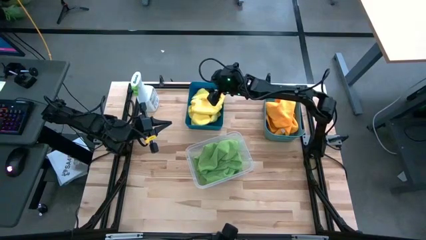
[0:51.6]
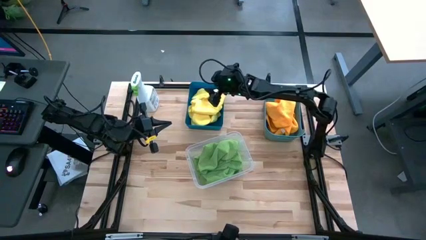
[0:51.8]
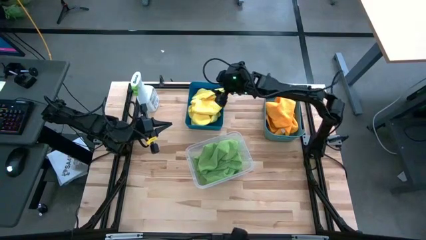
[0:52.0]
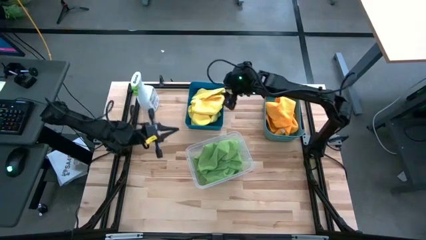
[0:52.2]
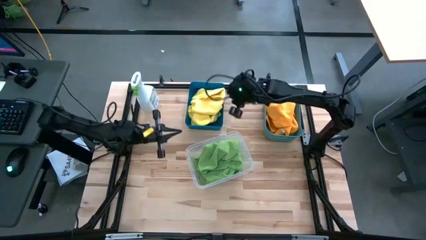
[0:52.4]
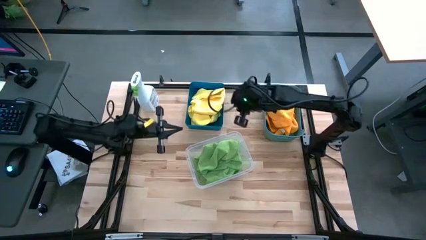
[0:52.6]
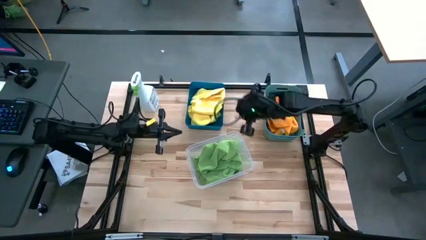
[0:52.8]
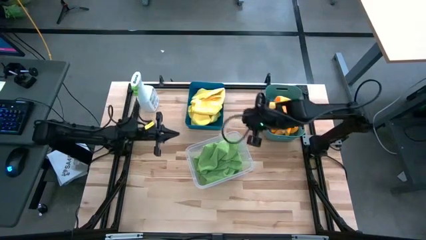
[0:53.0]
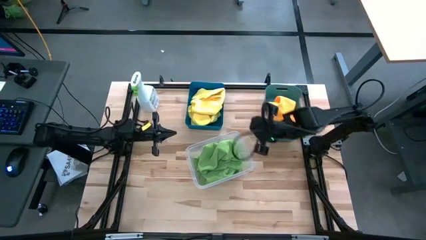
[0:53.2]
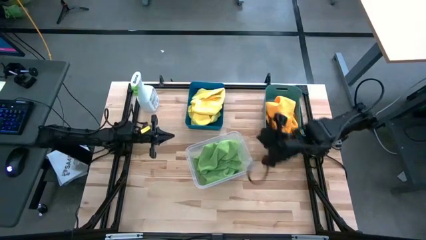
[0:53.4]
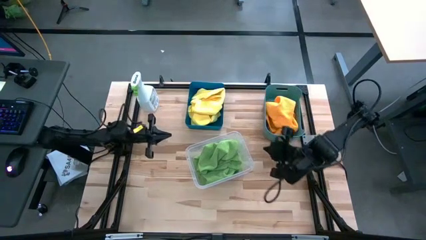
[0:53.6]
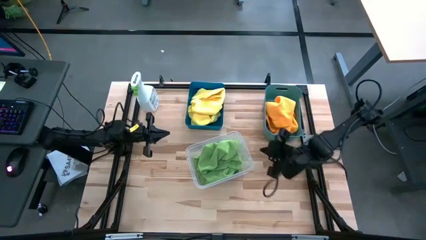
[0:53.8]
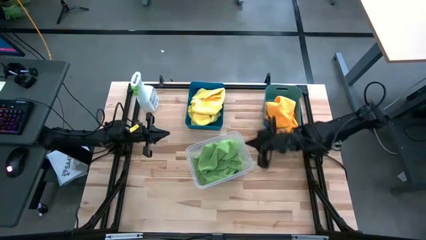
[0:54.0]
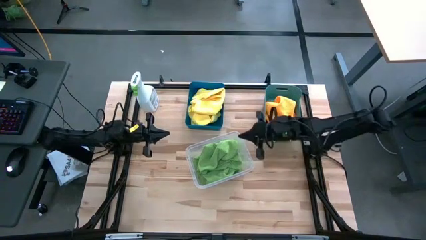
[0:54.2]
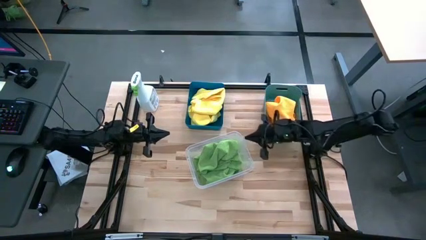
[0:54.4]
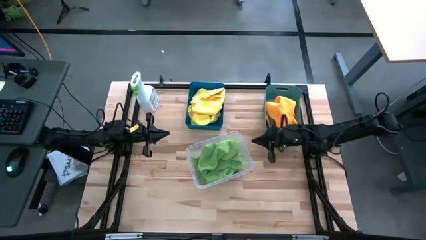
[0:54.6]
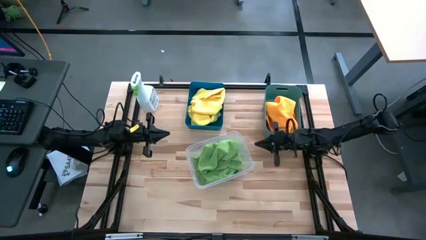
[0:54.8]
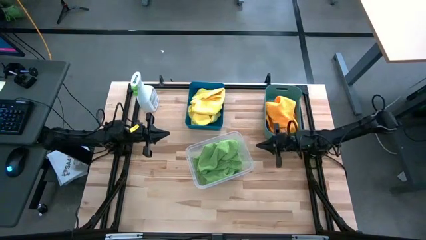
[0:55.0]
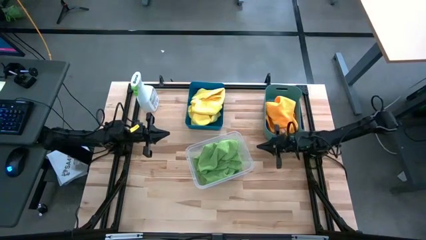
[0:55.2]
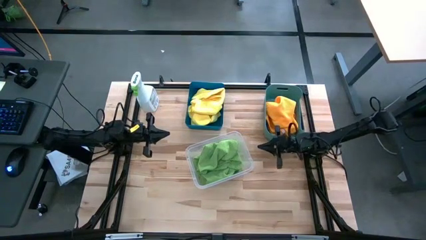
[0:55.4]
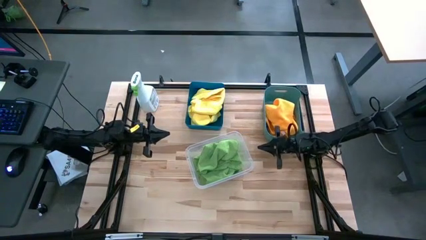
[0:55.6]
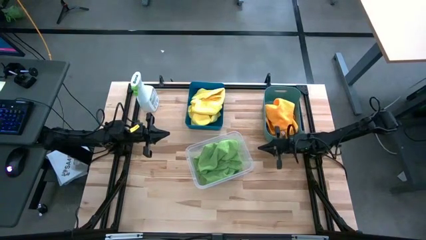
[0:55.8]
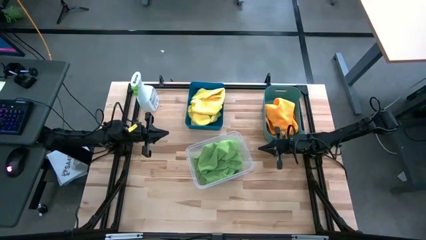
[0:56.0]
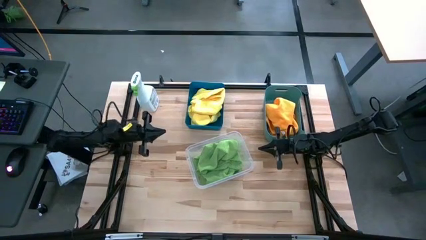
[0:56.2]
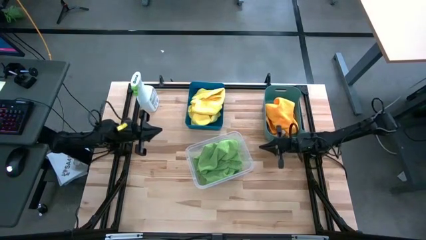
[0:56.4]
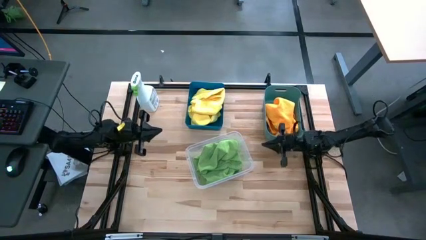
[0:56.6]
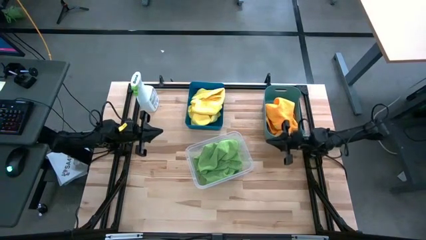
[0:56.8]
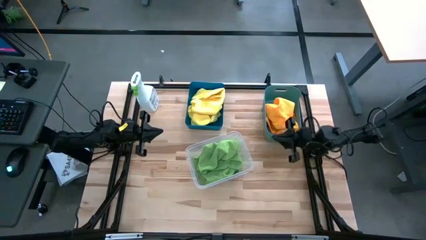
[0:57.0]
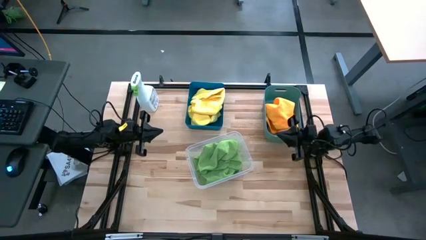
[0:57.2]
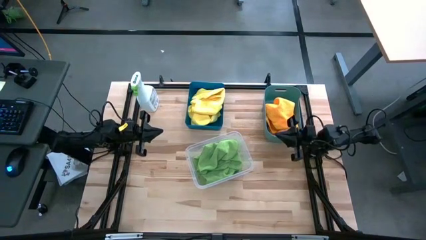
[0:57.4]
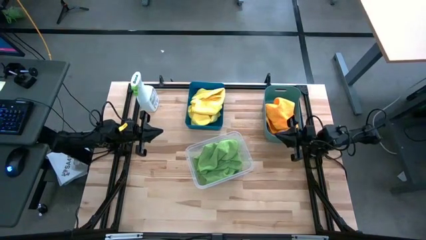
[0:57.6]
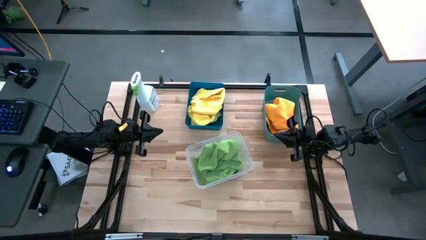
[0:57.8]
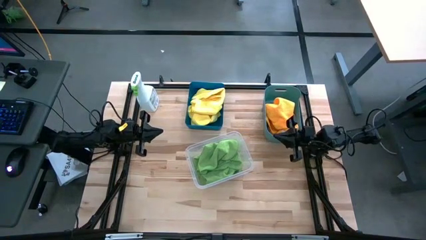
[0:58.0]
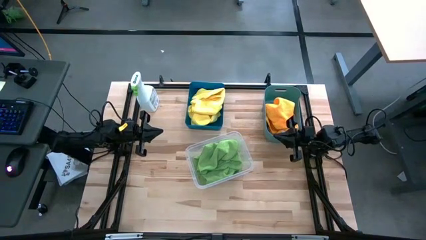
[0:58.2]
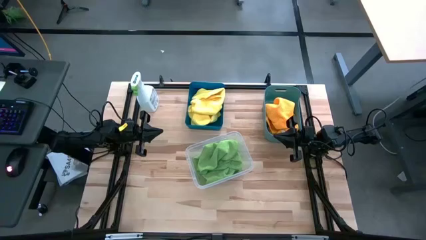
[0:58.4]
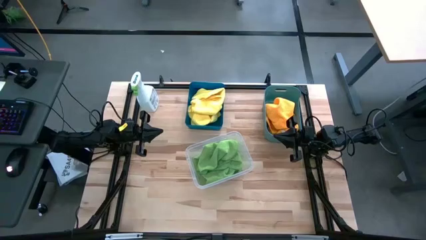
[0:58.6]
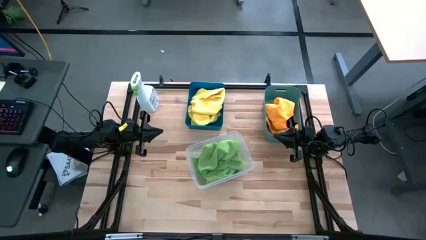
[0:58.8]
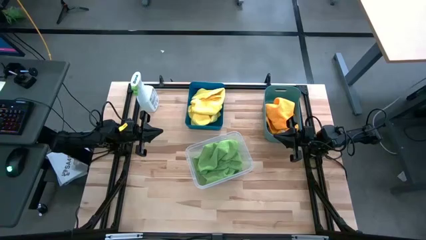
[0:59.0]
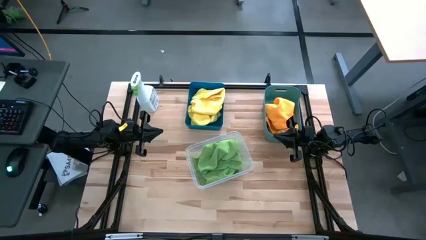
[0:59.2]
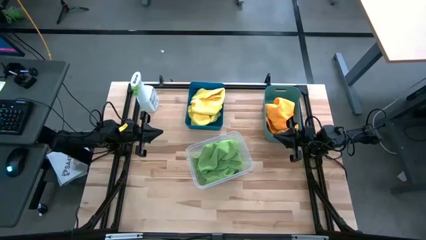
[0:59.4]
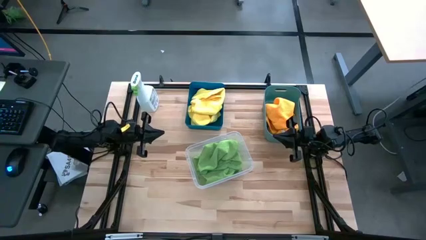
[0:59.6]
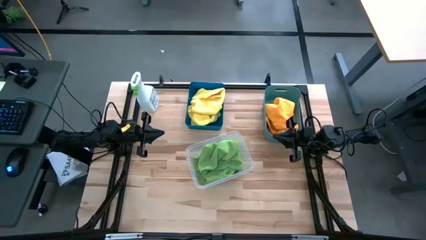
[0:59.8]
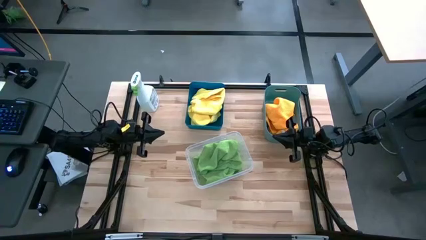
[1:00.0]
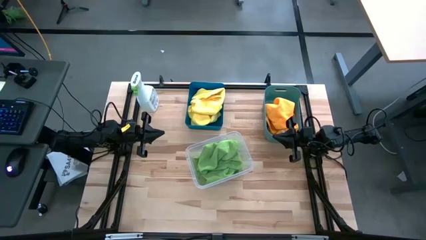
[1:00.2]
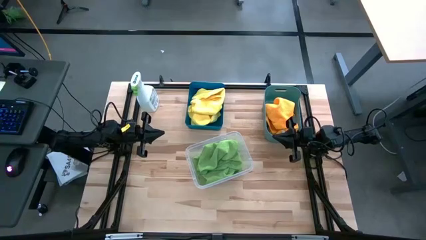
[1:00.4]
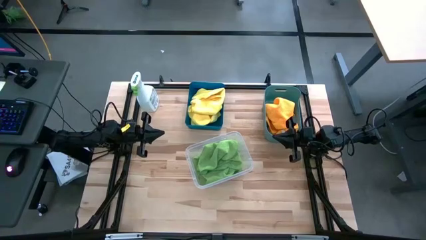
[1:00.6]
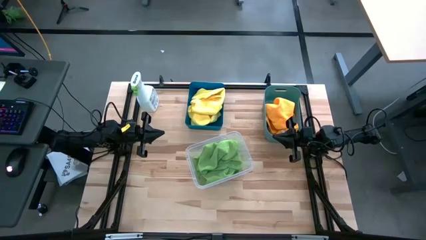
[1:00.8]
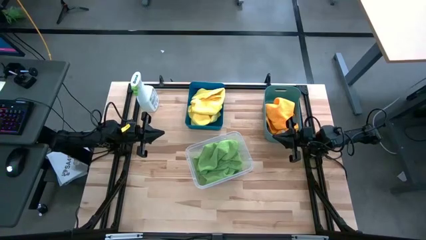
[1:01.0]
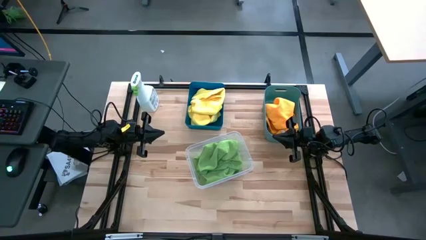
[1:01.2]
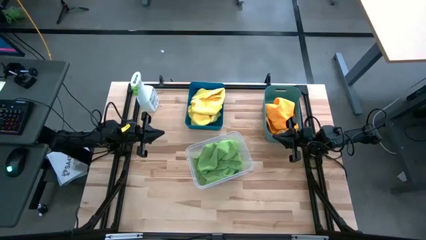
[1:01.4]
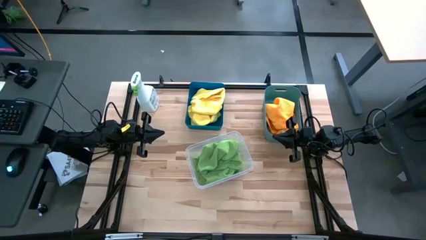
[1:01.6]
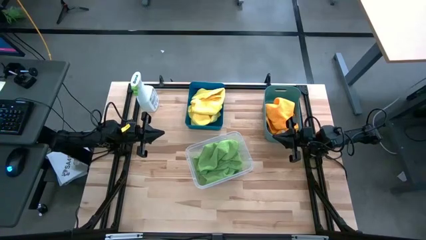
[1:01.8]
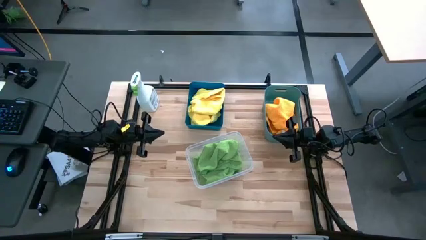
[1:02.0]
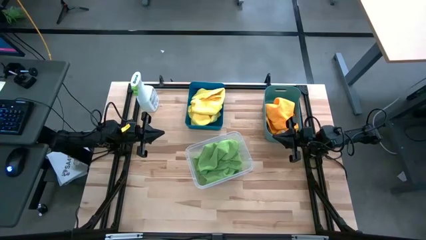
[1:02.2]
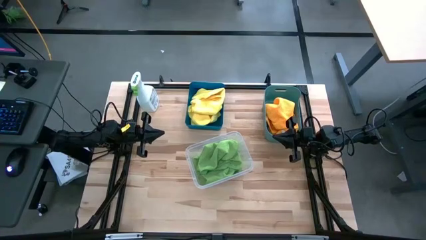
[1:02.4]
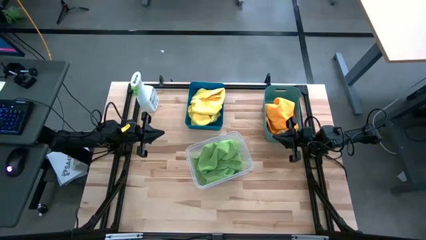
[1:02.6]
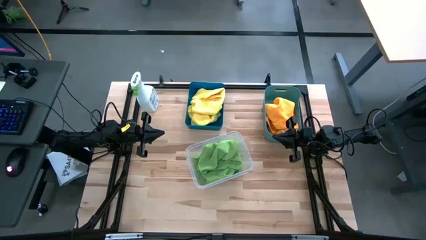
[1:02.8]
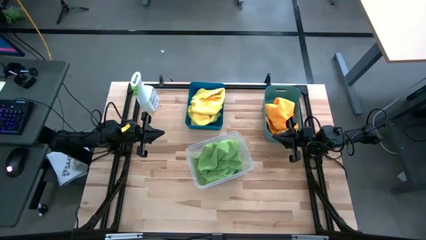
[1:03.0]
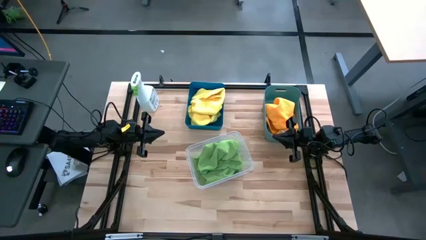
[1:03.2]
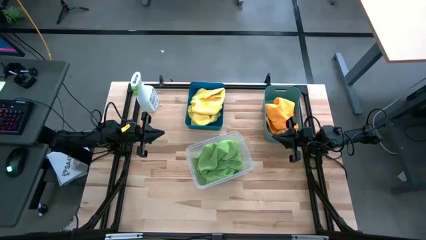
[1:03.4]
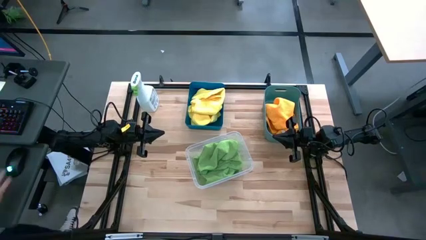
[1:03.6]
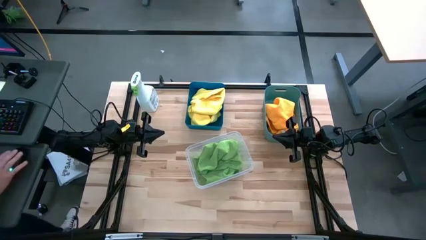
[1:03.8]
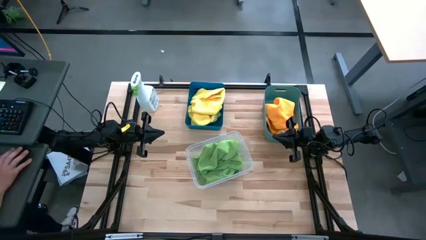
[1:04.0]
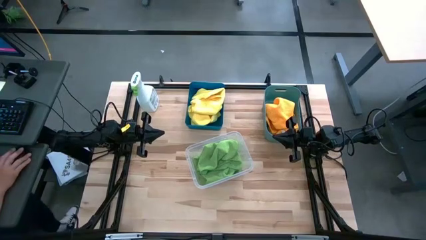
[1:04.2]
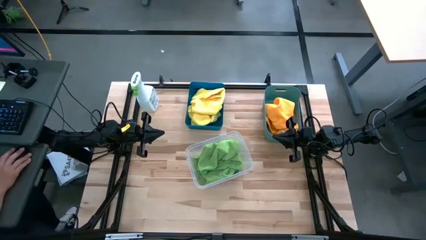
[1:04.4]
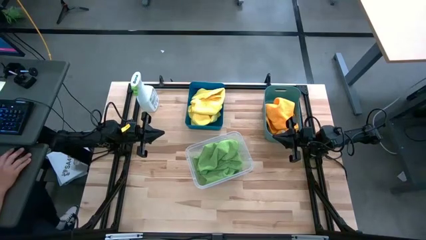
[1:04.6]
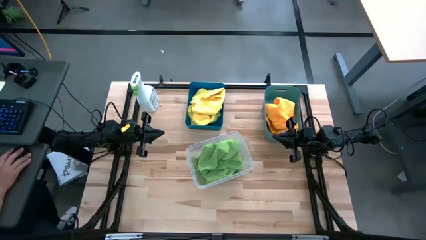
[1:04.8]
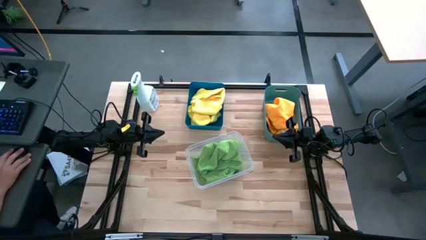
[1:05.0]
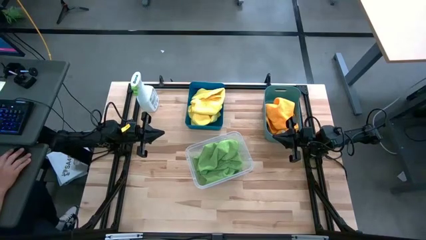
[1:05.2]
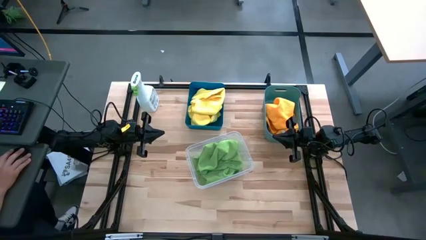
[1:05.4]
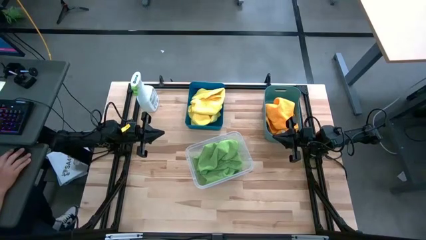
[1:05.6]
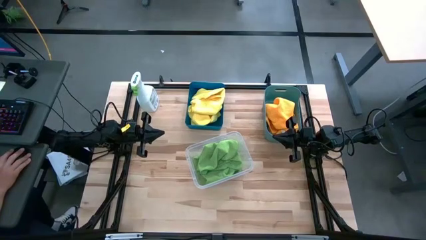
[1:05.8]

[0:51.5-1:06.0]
Task: Sort microfiber towel by color & place in baskets
Return to Home Position
